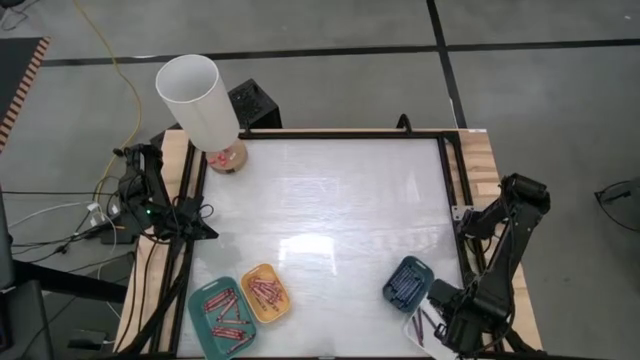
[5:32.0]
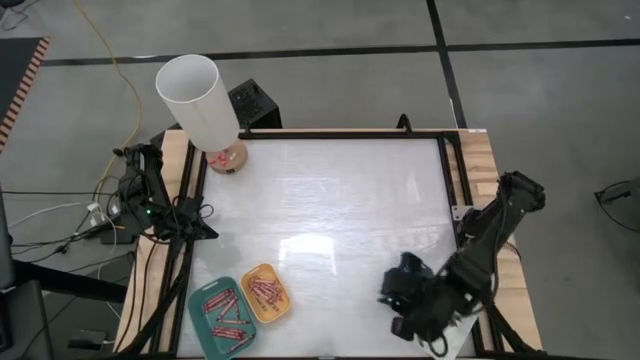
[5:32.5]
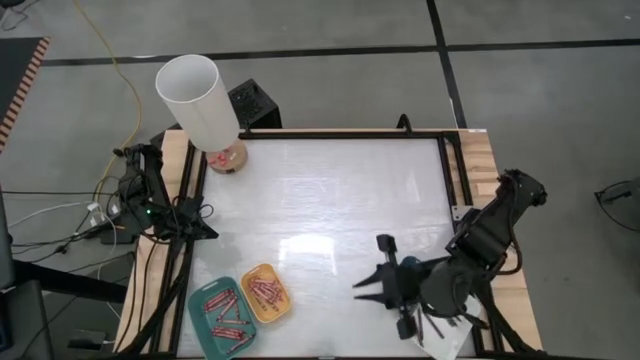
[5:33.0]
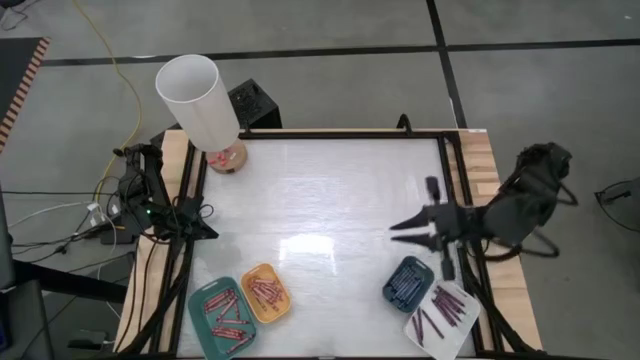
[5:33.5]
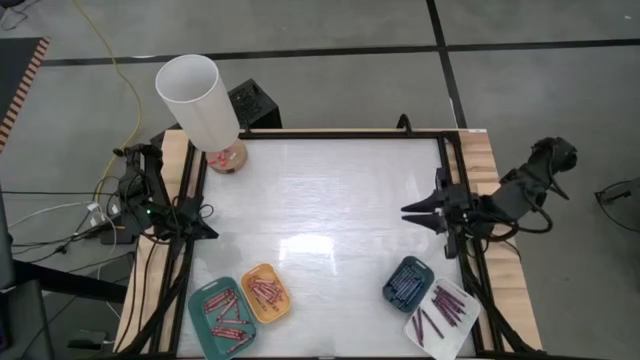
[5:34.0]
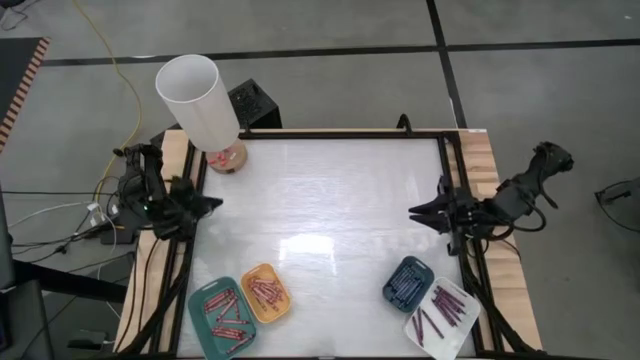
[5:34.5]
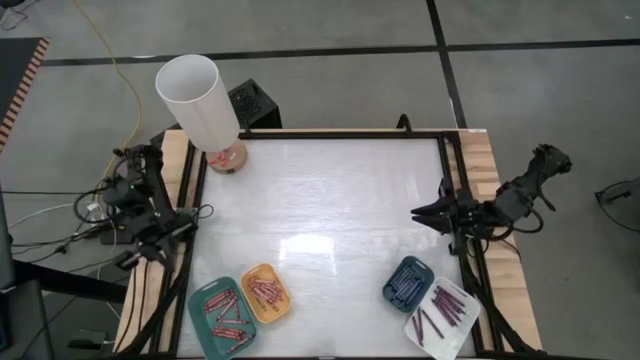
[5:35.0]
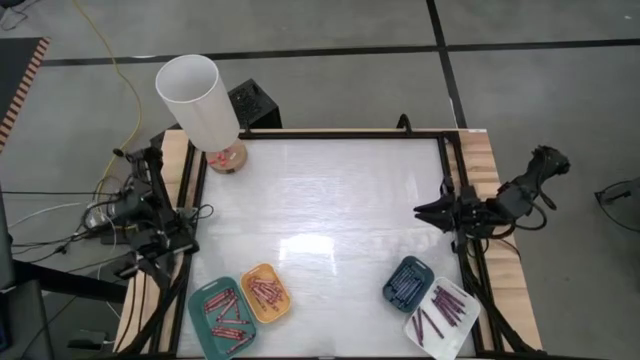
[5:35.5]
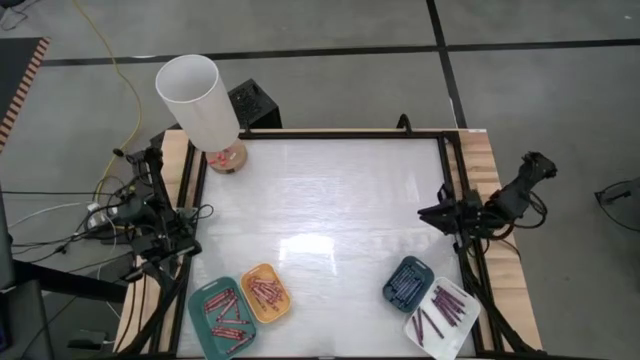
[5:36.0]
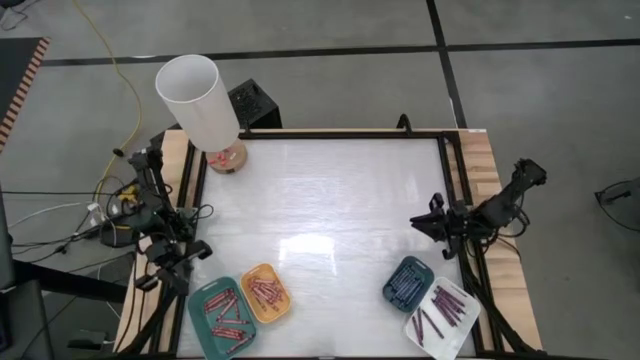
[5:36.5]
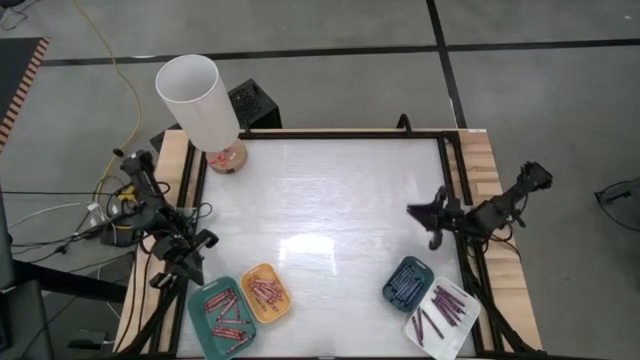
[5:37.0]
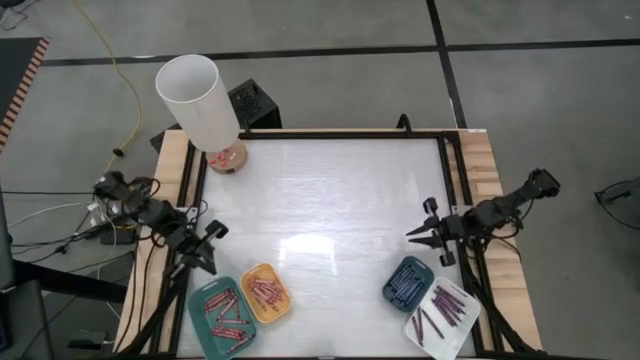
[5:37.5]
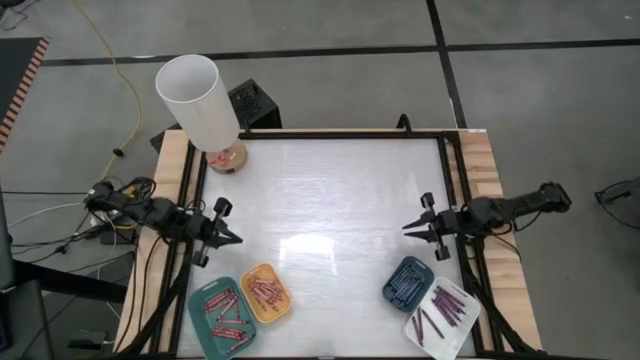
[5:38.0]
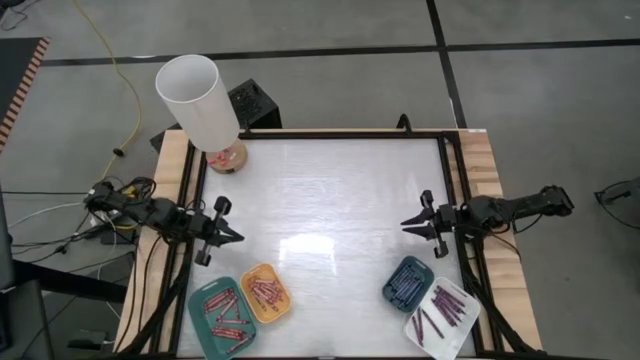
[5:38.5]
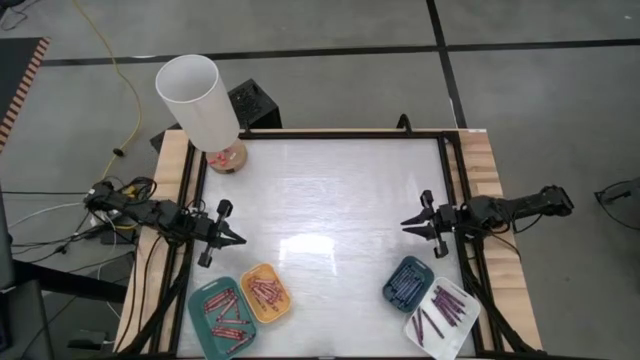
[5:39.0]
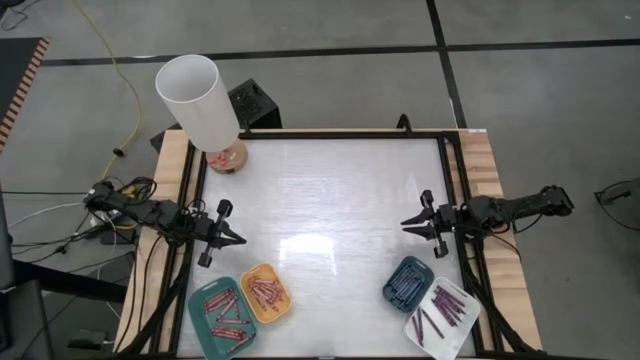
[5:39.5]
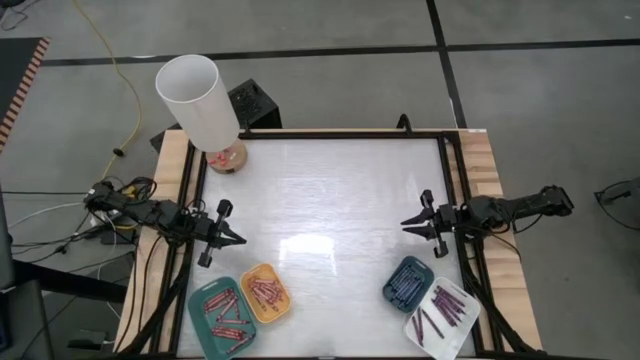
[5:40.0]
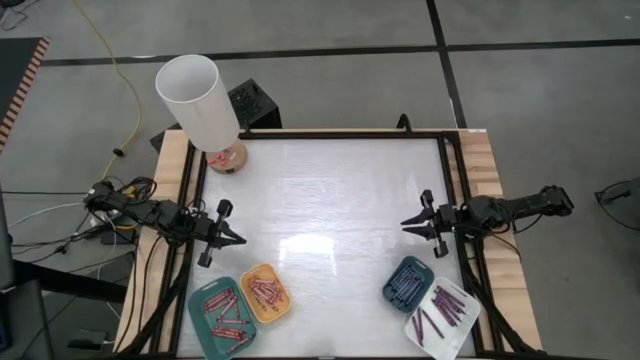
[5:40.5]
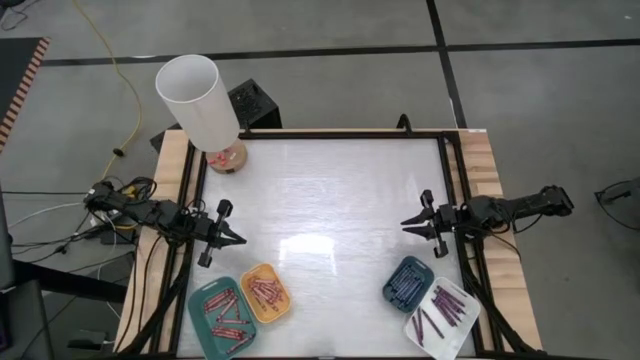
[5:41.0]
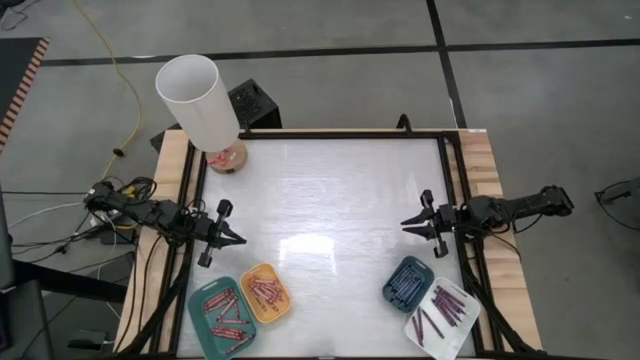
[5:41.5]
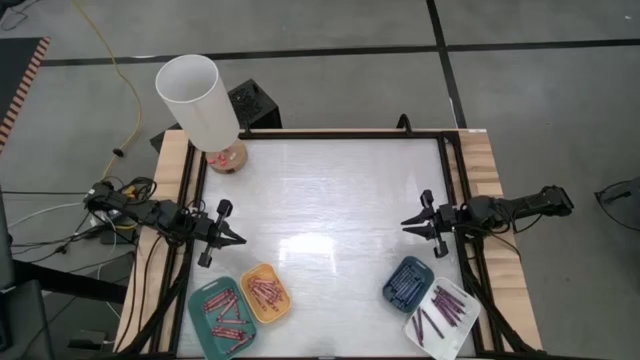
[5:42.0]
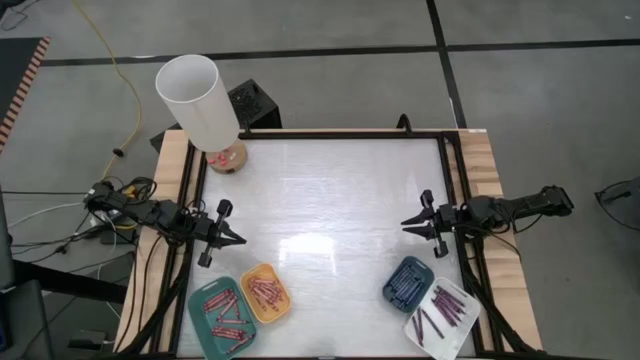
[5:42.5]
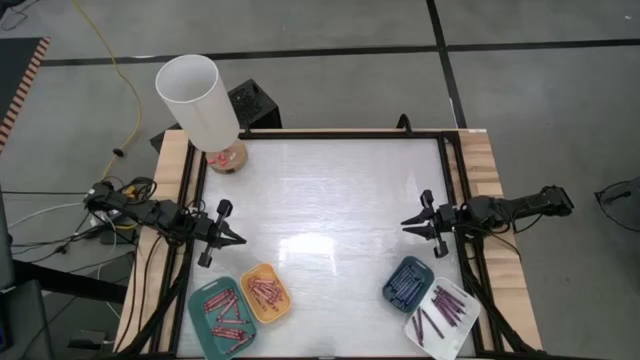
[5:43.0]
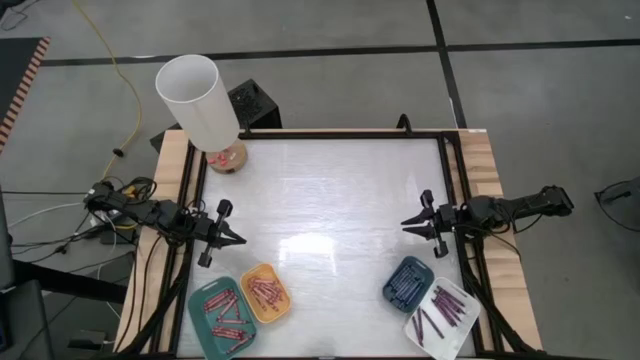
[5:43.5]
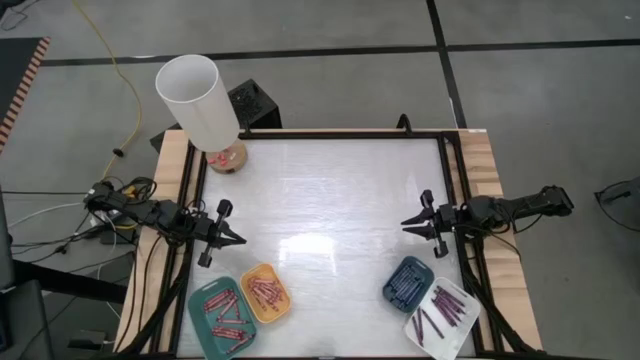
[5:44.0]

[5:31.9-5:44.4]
Task: Sort crayons
Return to Home Position

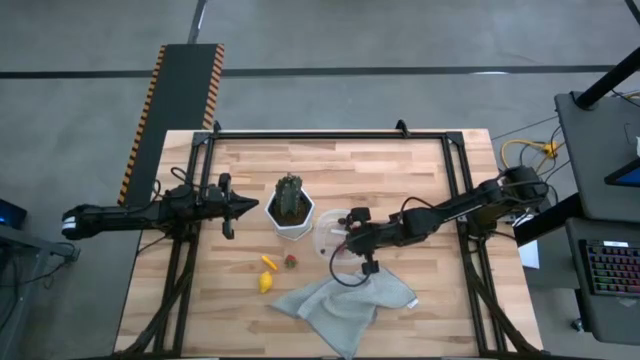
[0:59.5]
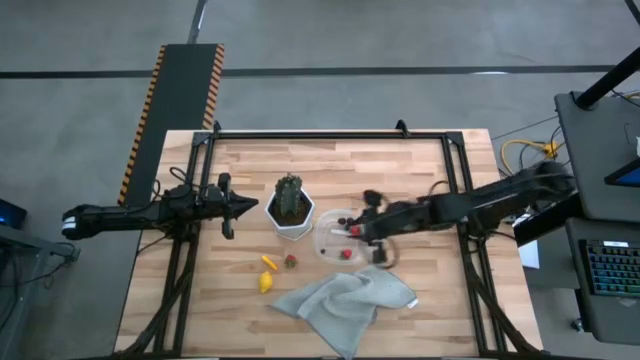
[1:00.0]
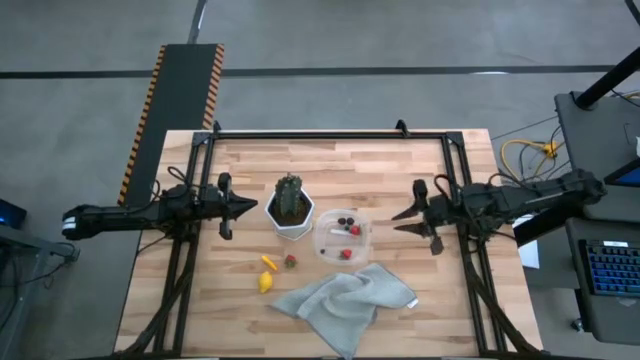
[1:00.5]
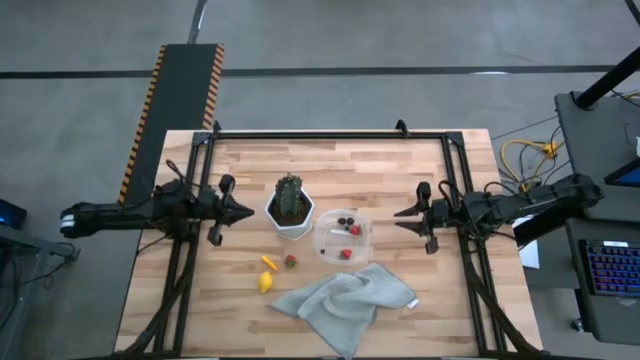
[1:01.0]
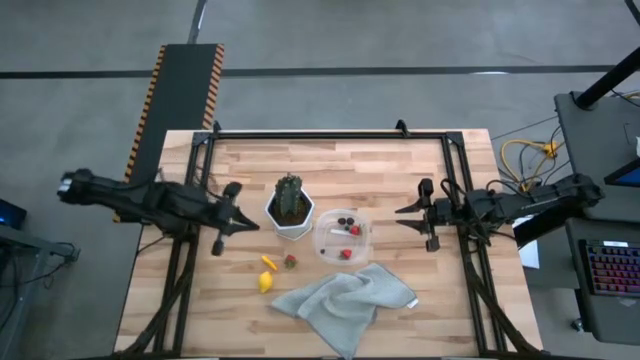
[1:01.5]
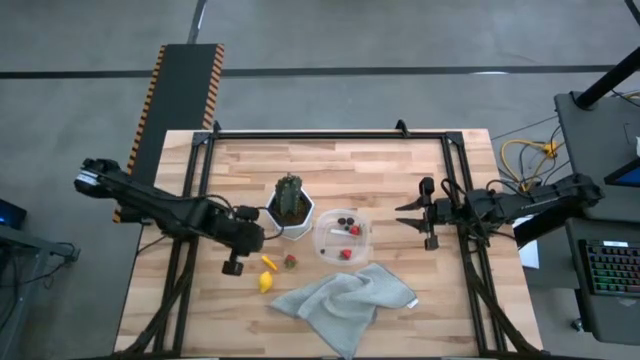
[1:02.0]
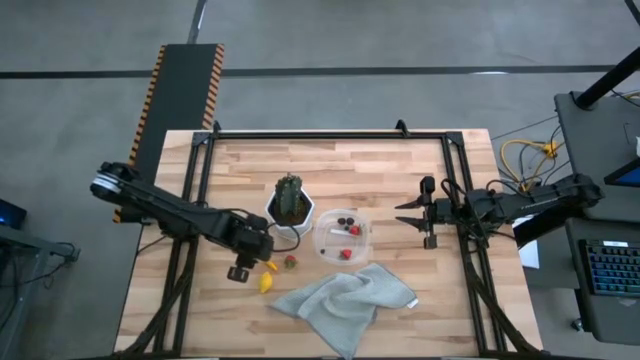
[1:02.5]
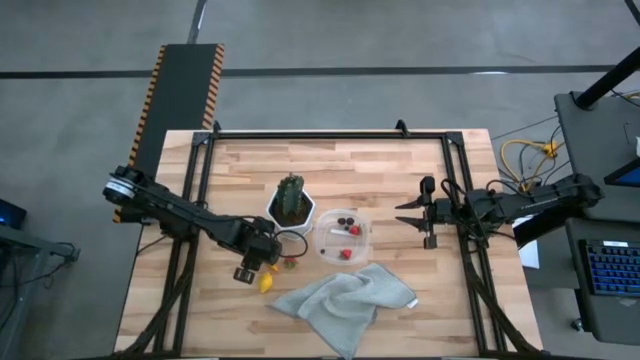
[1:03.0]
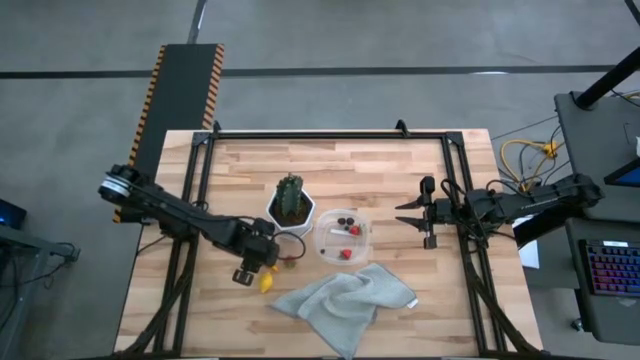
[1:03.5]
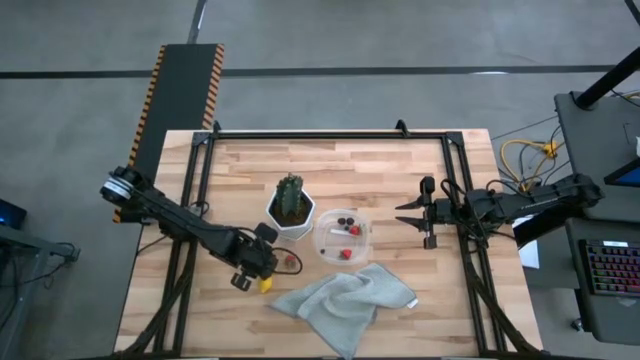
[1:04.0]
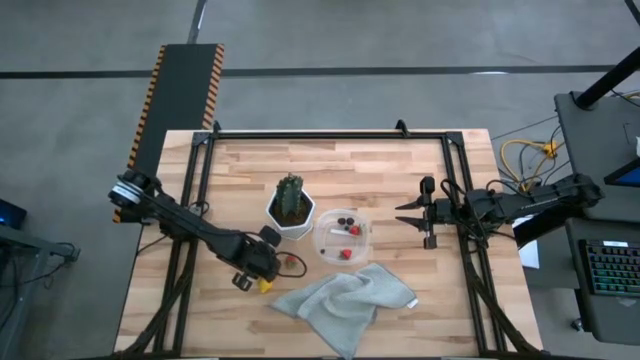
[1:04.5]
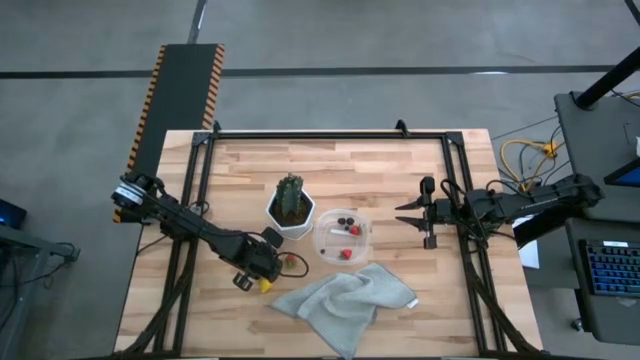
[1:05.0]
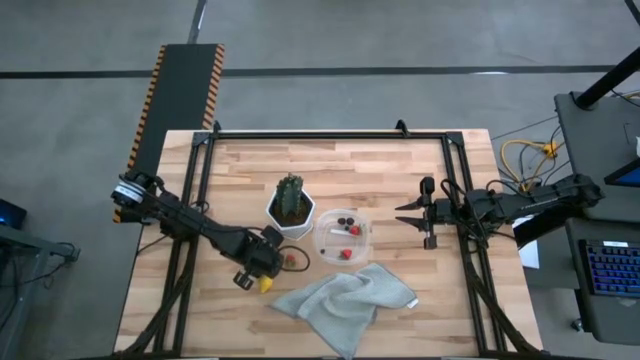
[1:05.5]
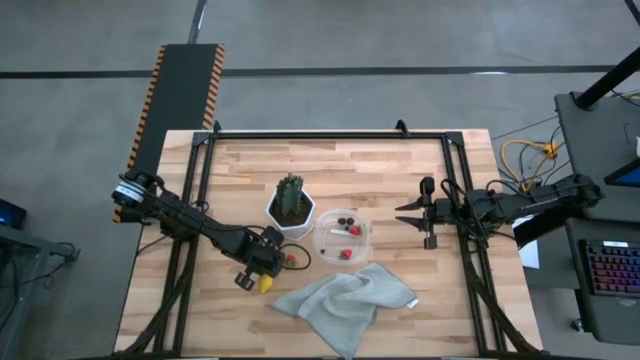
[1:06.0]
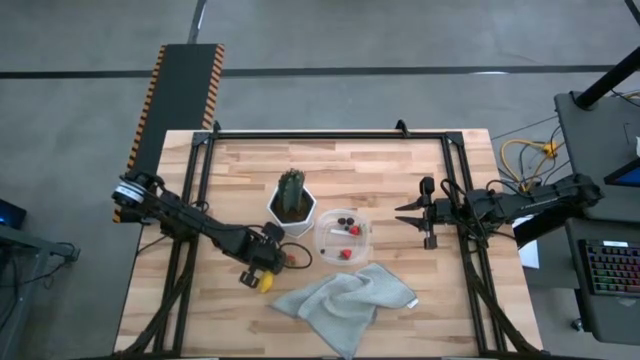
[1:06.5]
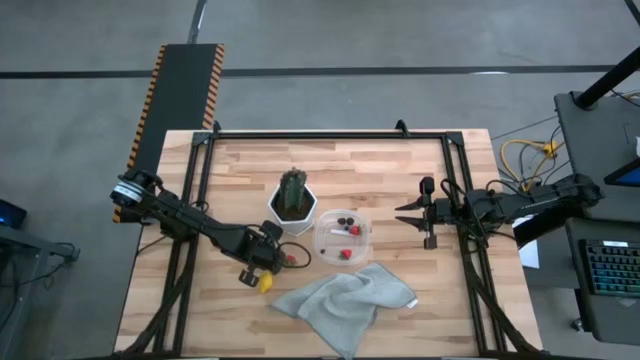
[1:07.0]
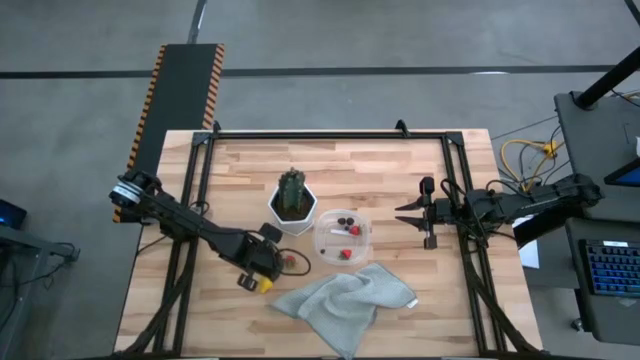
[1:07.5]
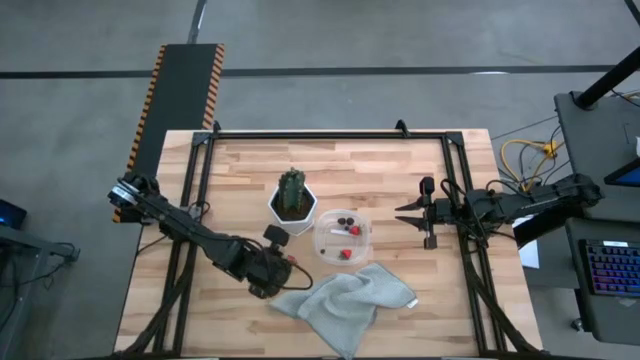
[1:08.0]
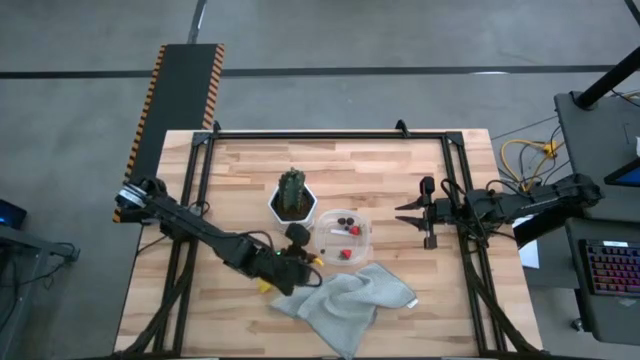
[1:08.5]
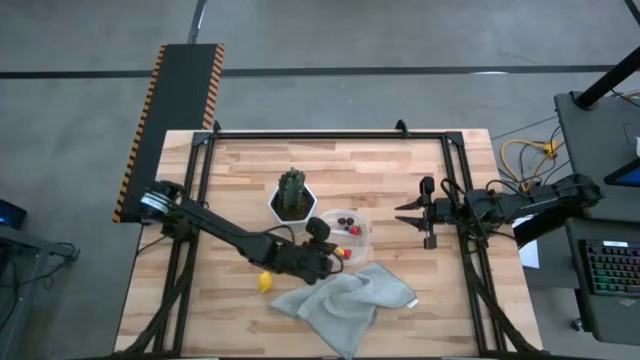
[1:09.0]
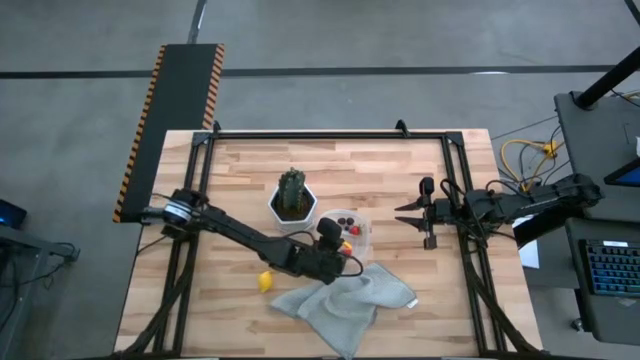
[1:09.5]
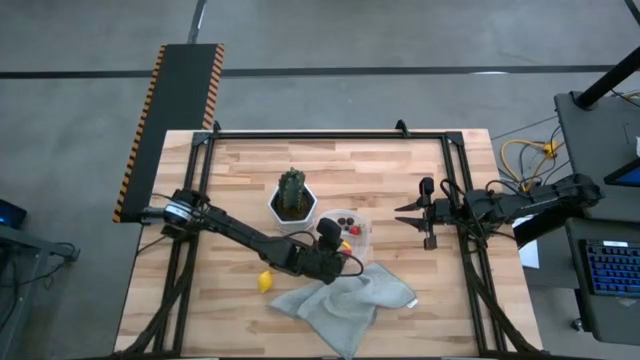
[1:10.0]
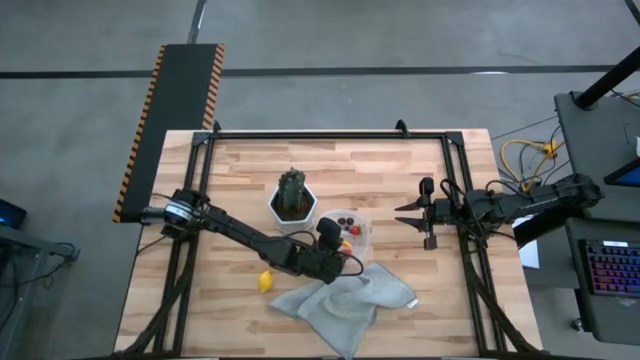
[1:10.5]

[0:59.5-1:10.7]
Task: Pick and placing Produce into tupperware
Put the corn into the transparent bin
